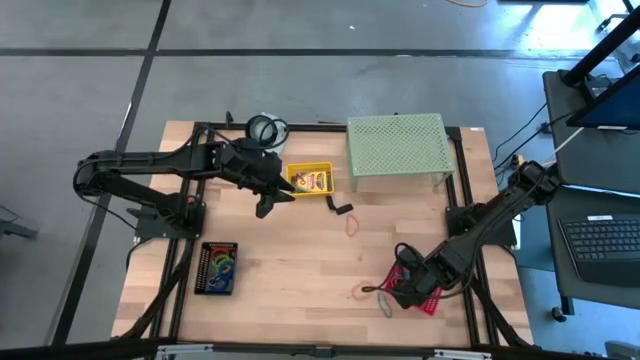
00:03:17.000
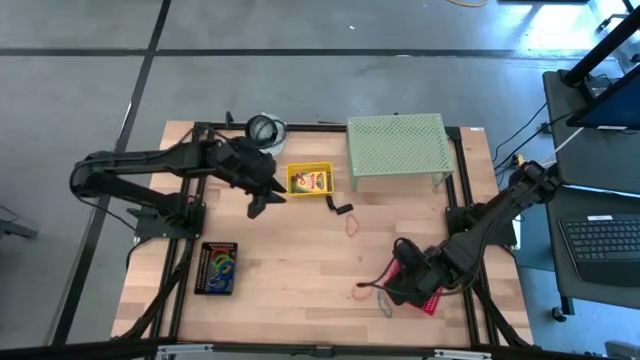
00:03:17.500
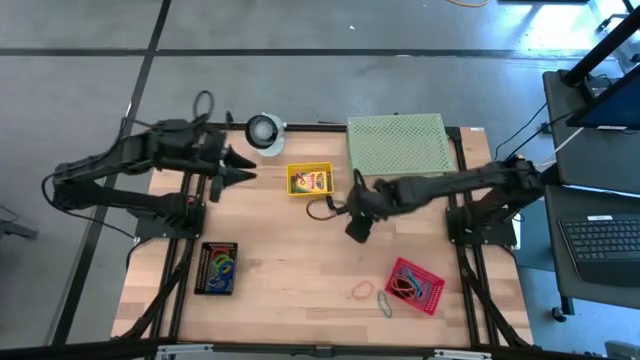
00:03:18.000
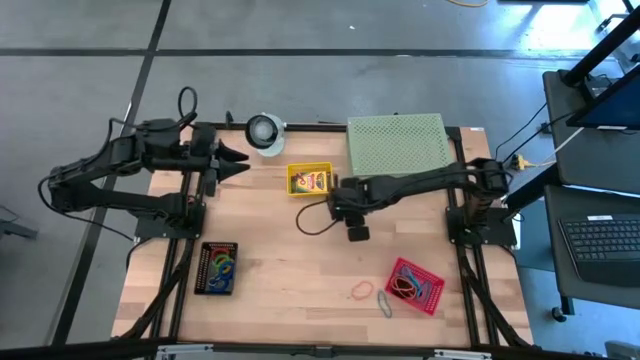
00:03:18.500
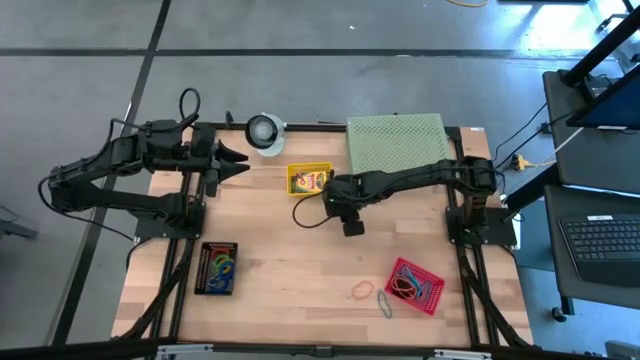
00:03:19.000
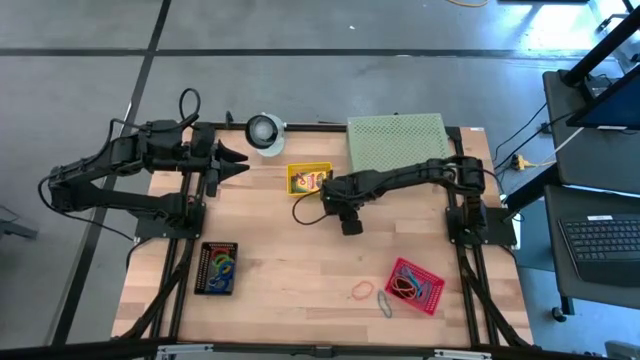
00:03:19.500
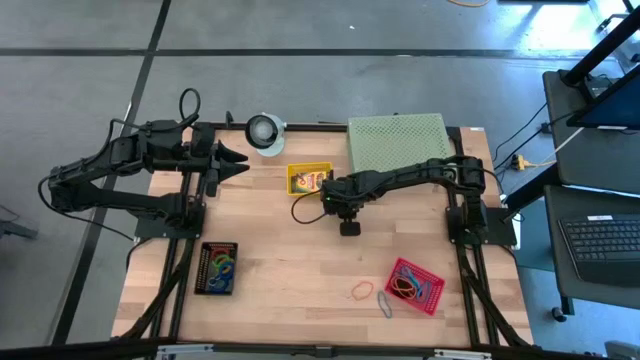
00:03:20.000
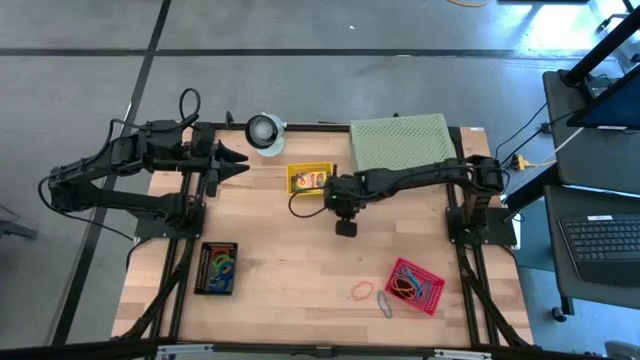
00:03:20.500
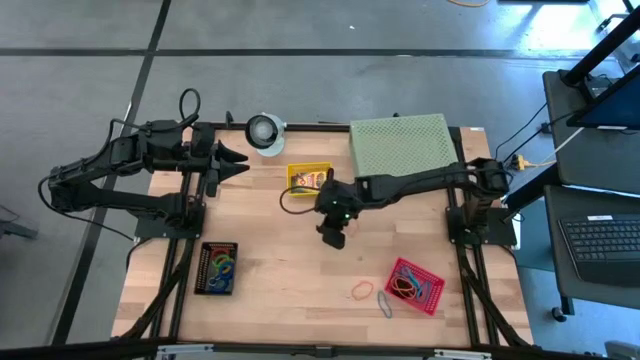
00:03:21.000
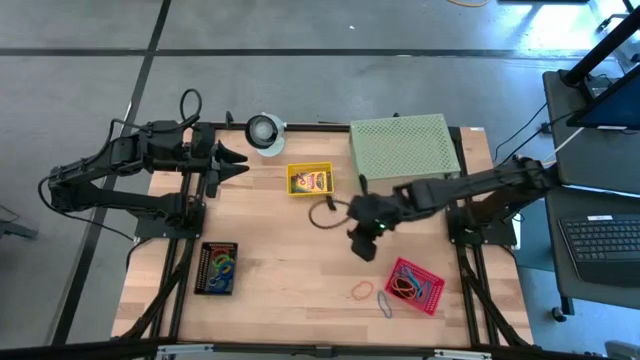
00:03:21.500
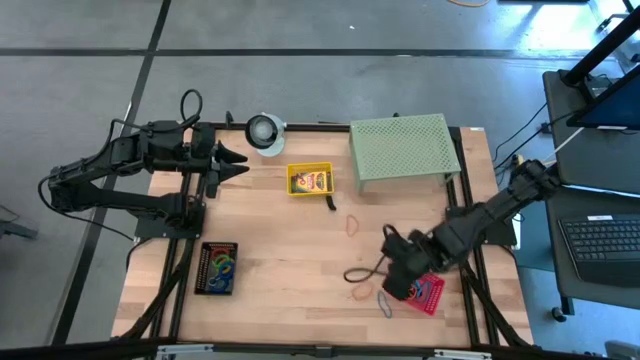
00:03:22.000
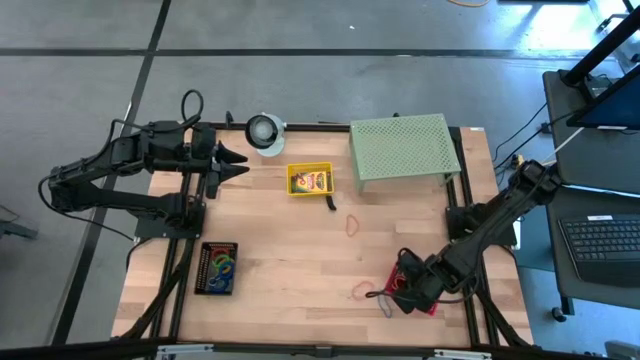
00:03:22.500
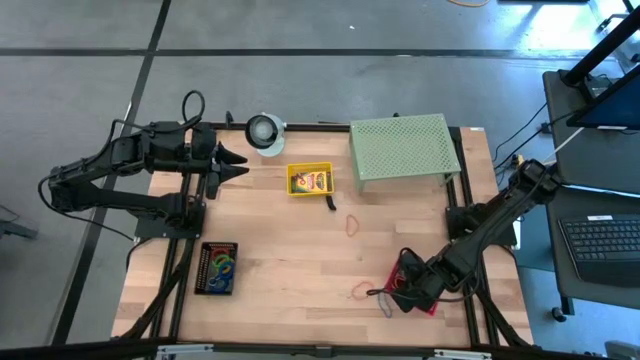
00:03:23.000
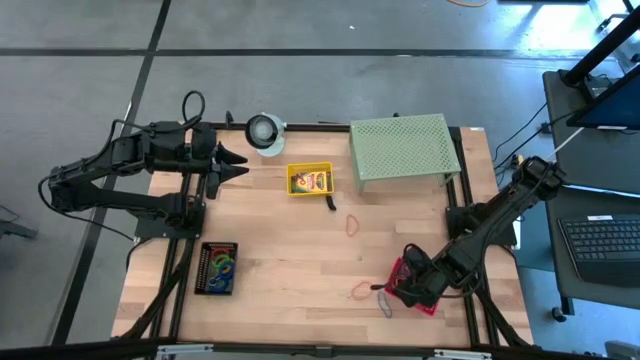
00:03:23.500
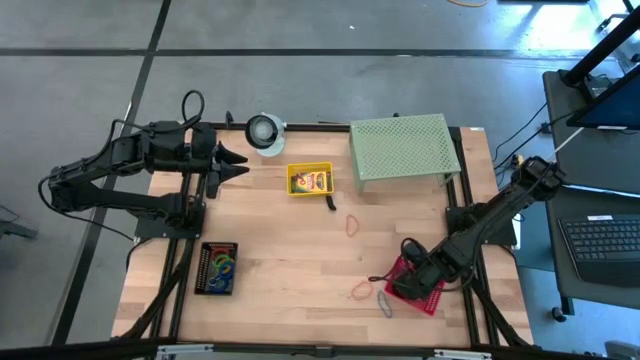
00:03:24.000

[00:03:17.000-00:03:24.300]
Task: Pick & Place Office Desk Supplies
Put the black rubber band into the red bin

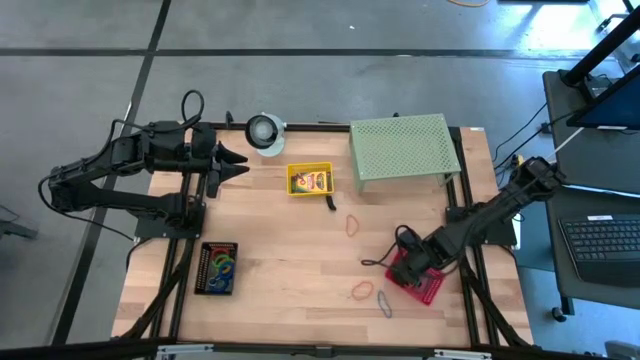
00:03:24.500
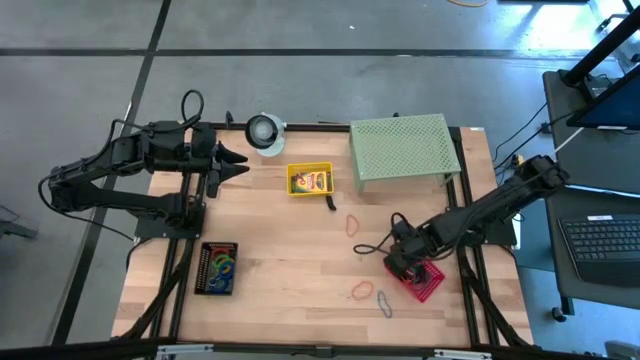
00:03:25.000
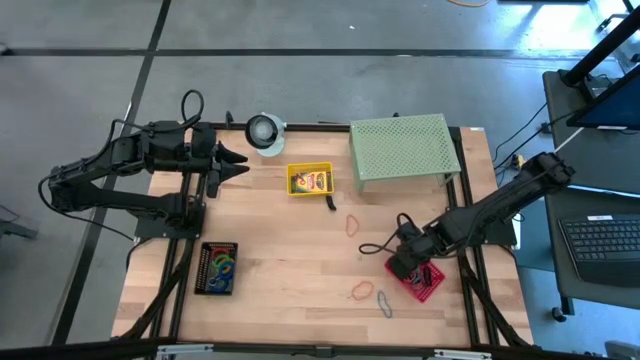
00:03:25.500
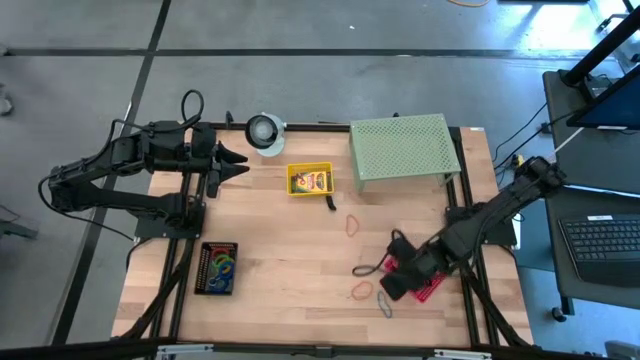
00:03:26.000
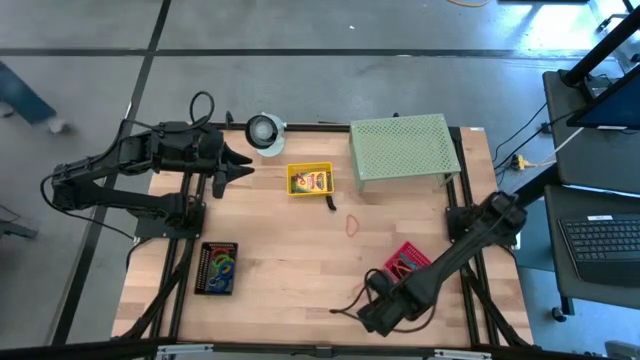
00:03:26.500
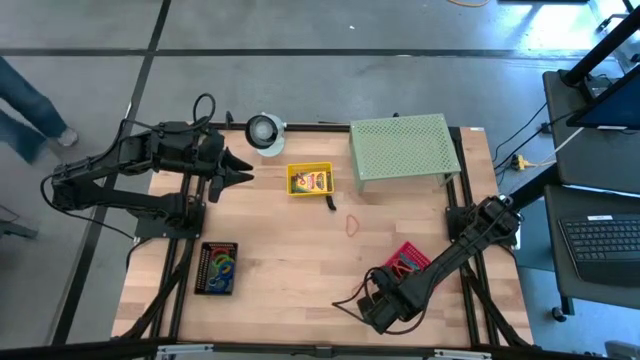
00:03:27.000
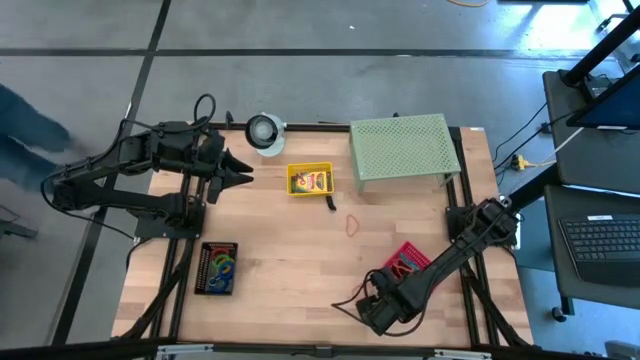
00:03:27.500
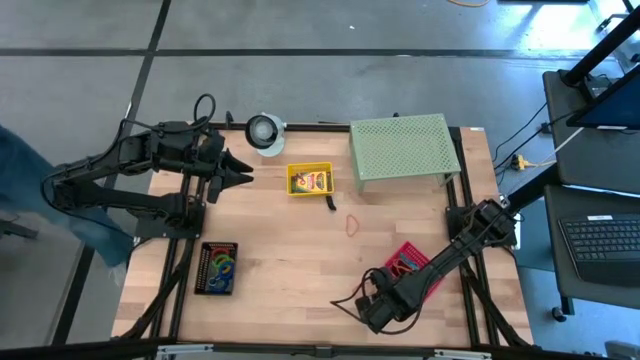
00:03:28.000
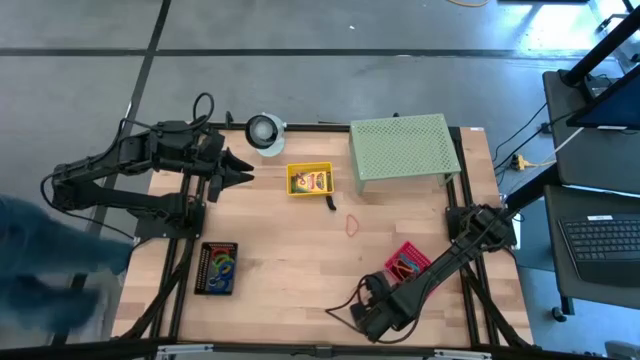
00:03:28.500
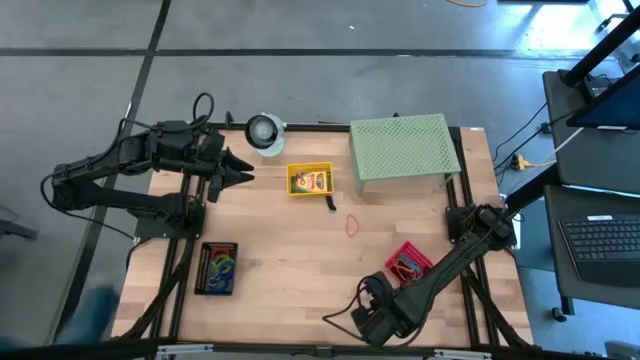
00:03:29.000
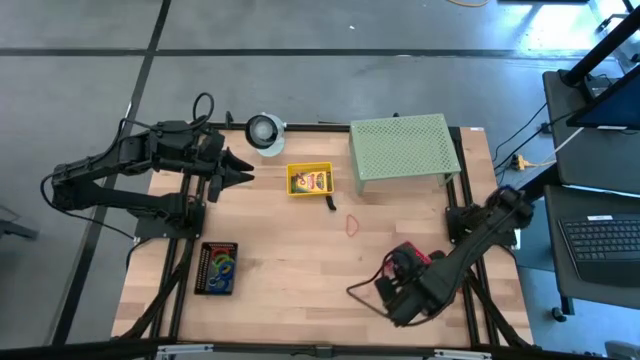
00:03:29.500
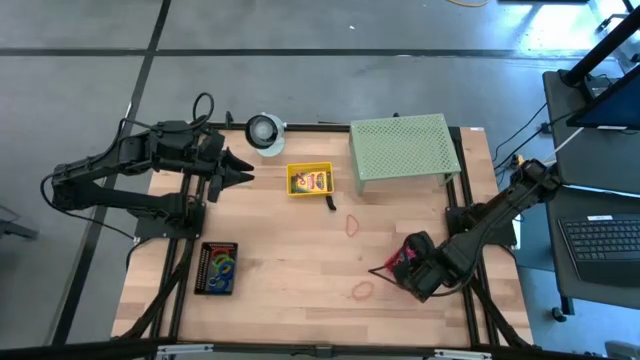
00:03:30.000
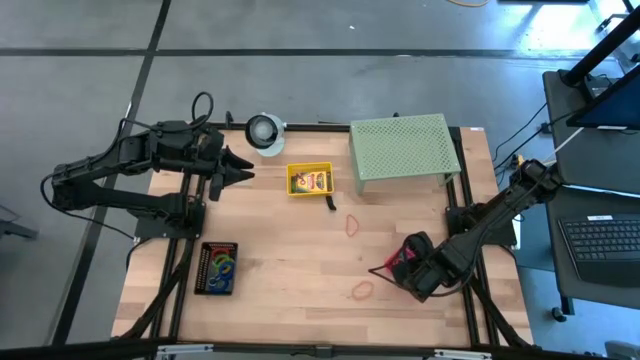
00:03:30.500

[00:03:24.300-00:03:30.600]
Put the blue rubber band into the red bin

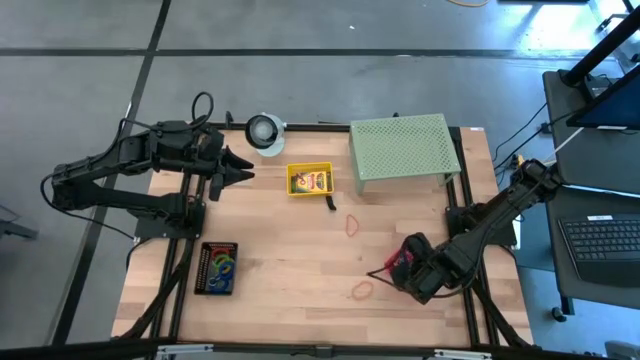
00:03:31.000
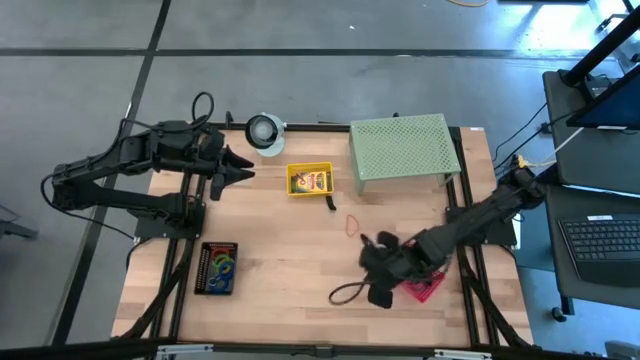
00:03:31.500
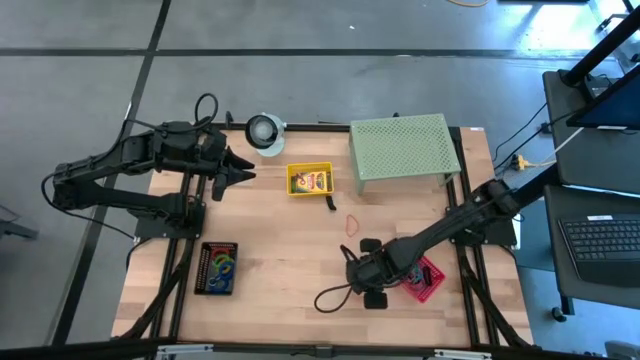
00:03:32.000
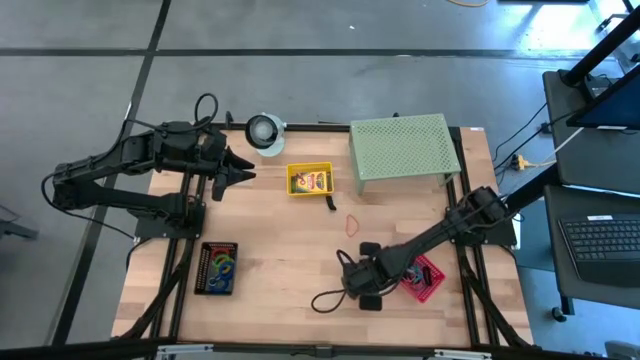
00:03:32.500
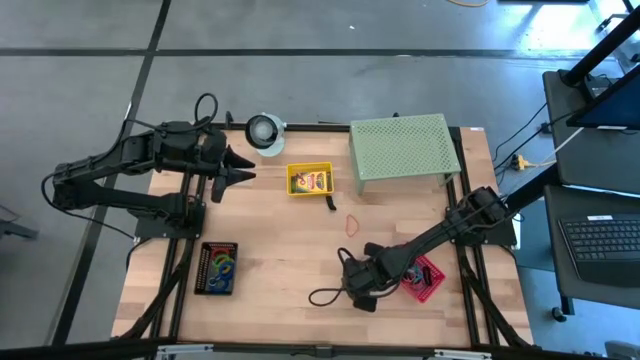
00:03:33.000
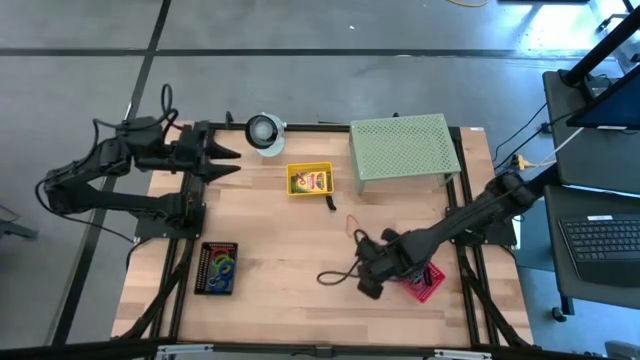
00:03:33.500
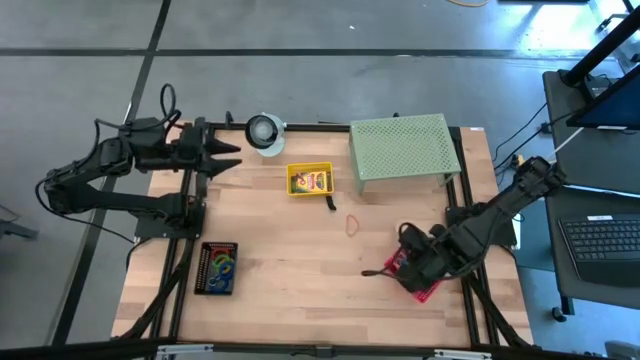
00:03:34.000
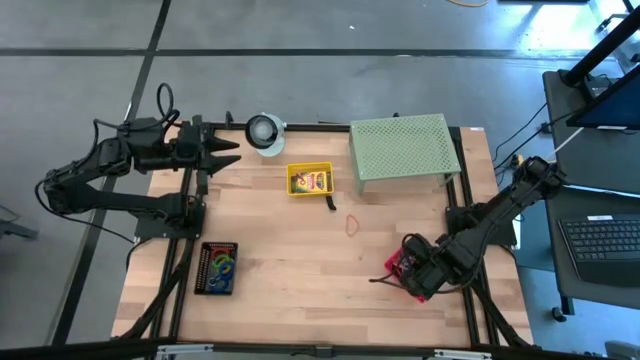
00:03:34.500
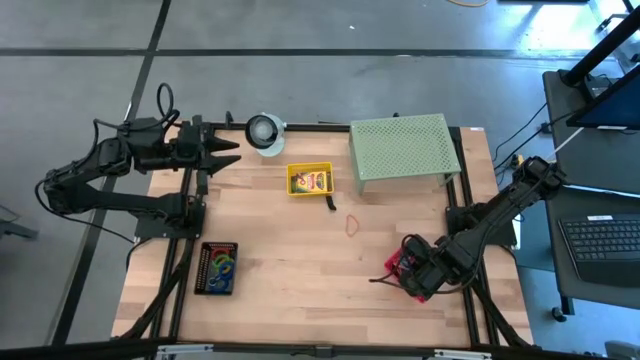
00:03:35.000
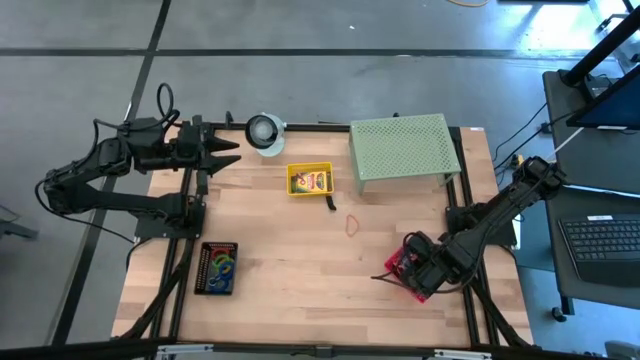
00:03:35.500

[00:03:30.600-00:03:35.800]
Put the orange rubber band into the red bin

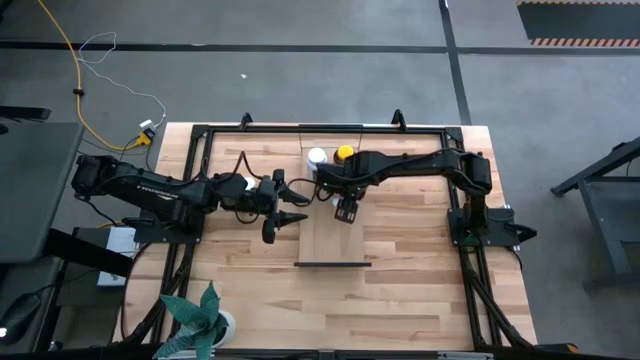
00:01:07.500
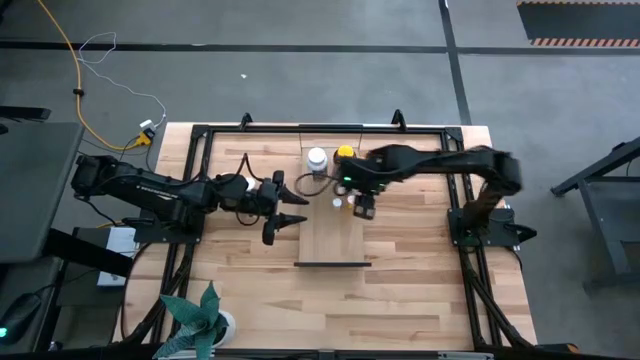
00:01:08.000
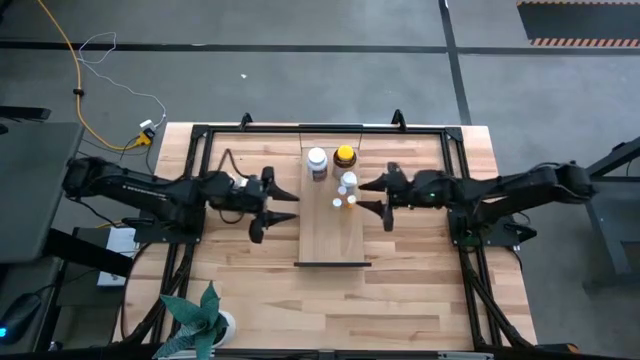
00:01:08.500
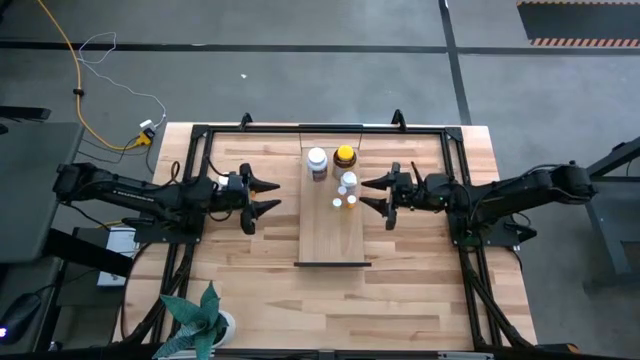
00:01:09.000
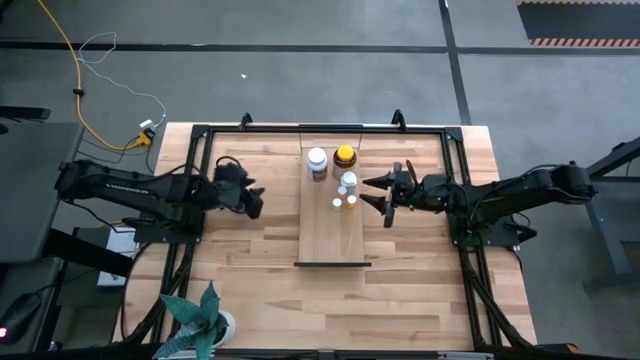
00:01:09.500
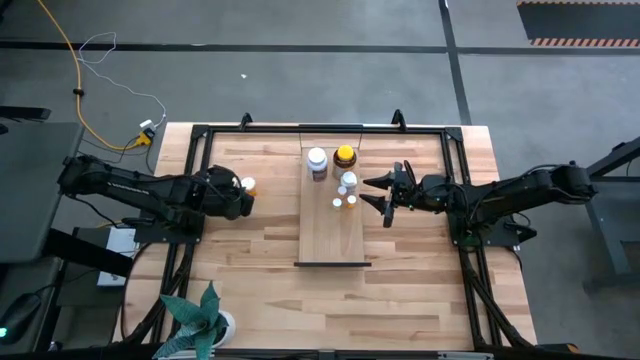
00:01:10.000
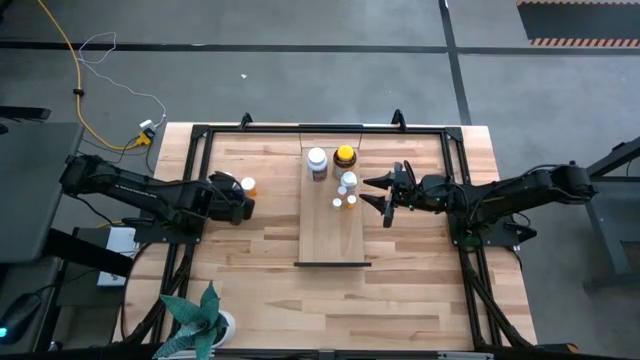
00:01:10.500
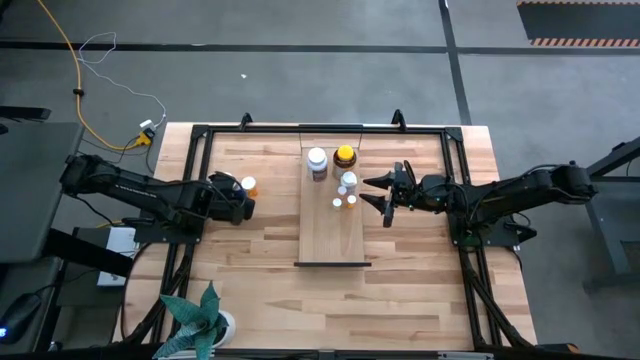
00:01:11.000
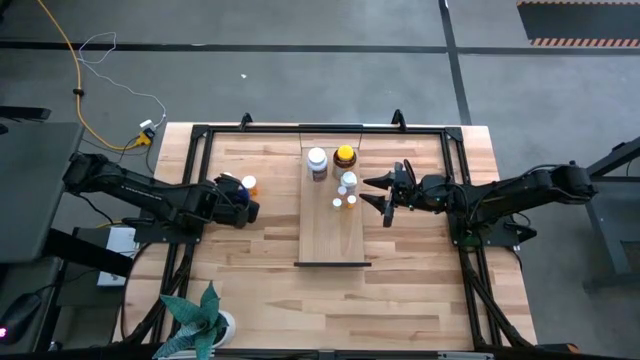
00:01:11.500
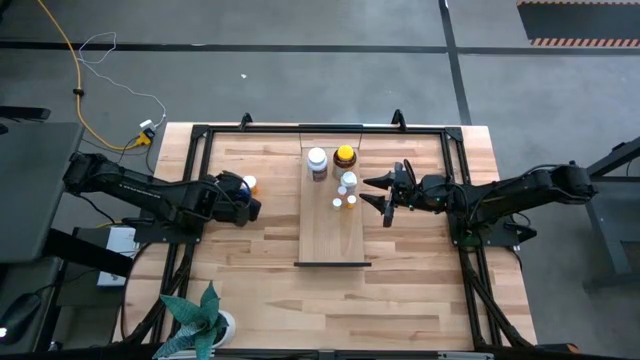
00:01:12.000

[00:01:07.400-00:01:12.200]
Task: Pick and place medicine bottles onto shelf by color
Put the blue pill bottle on the shelf
